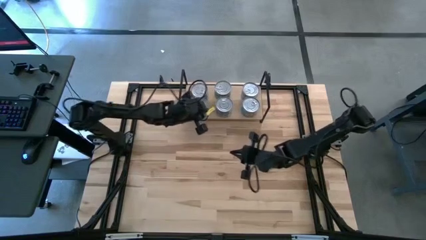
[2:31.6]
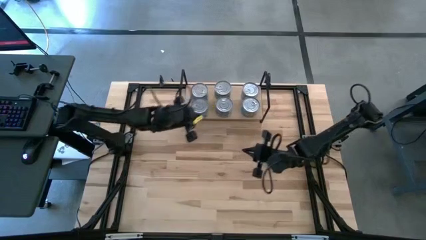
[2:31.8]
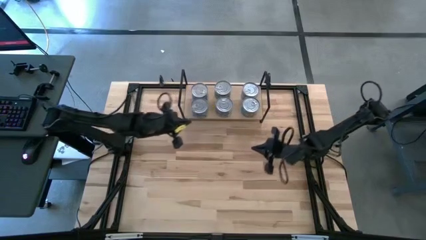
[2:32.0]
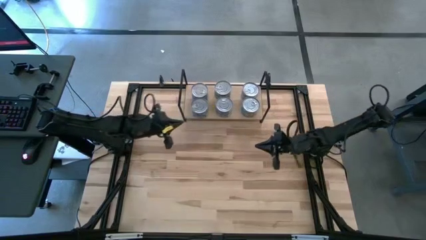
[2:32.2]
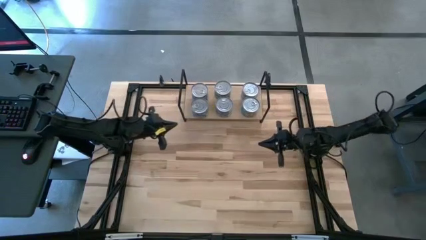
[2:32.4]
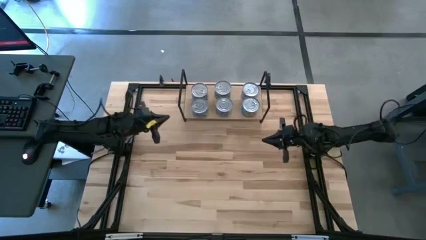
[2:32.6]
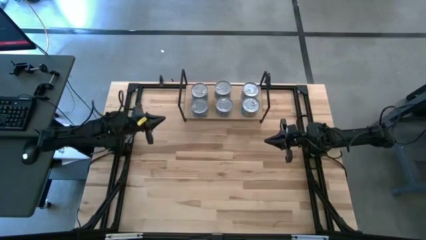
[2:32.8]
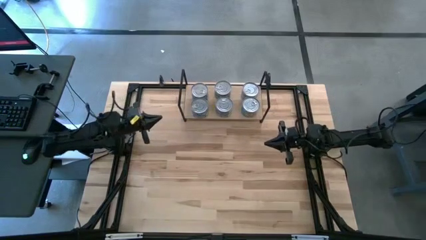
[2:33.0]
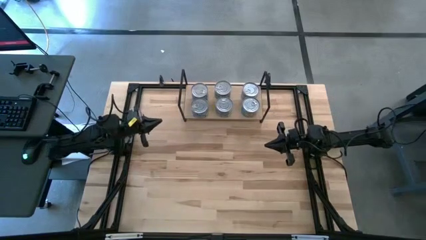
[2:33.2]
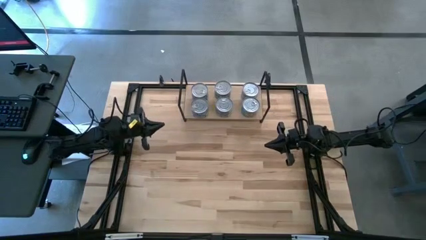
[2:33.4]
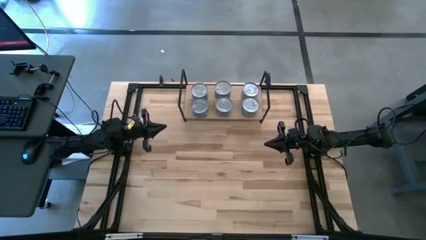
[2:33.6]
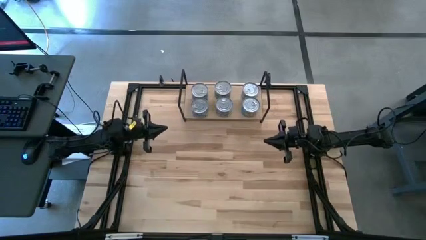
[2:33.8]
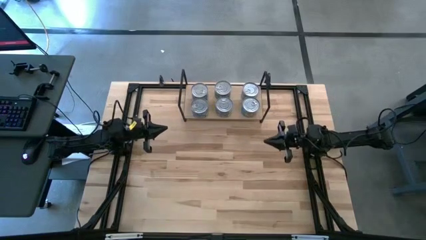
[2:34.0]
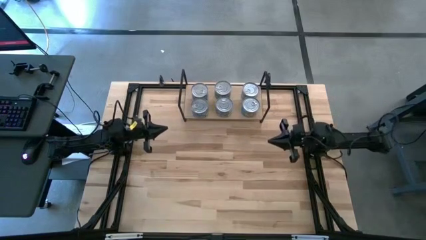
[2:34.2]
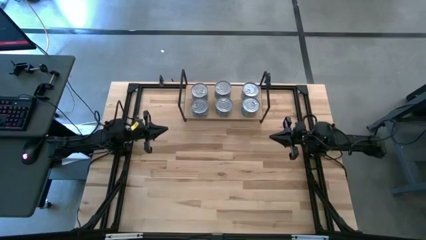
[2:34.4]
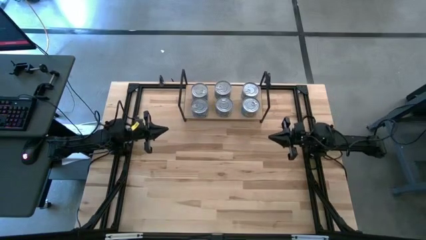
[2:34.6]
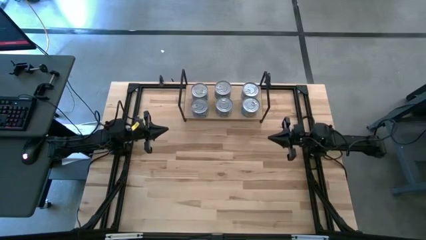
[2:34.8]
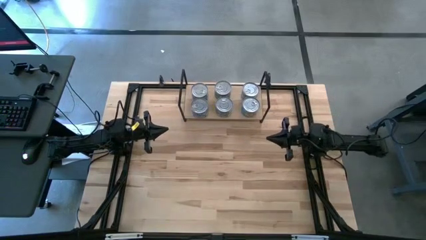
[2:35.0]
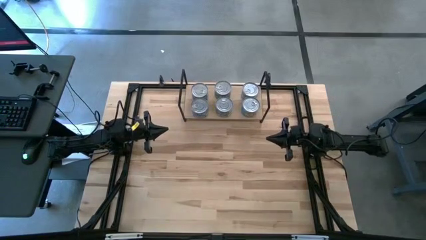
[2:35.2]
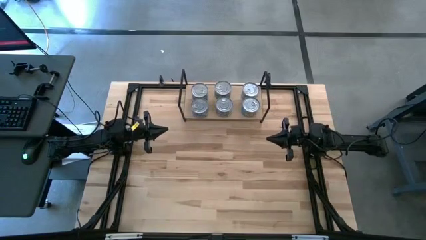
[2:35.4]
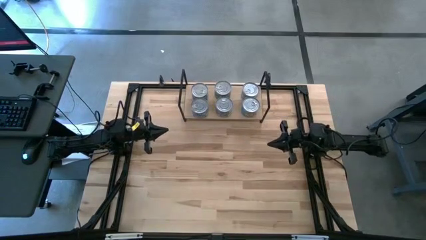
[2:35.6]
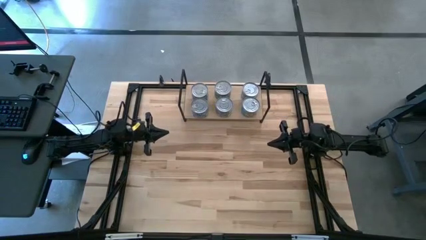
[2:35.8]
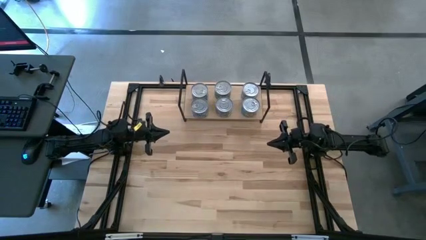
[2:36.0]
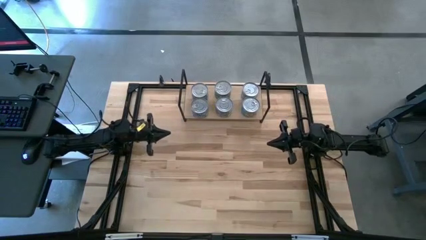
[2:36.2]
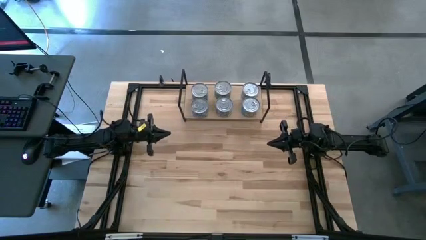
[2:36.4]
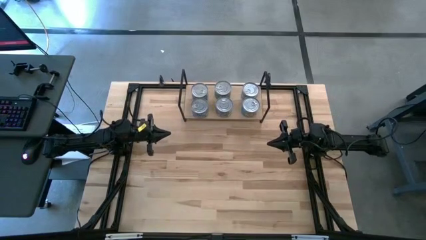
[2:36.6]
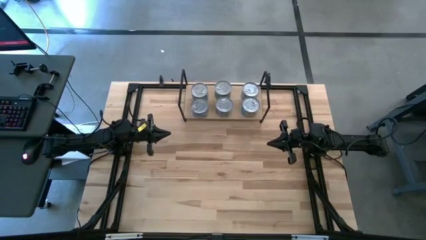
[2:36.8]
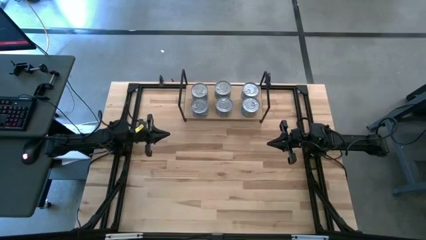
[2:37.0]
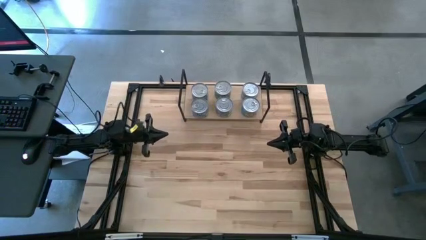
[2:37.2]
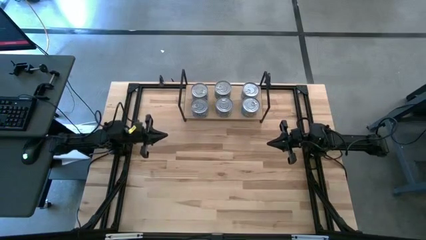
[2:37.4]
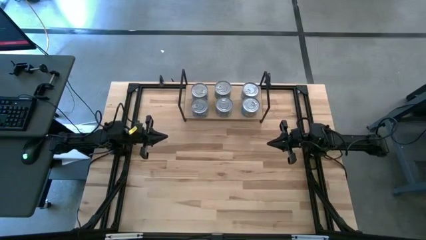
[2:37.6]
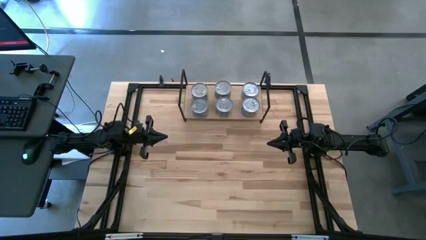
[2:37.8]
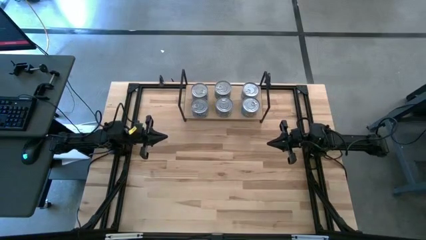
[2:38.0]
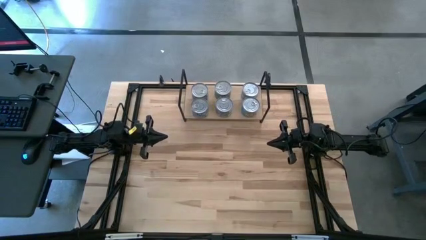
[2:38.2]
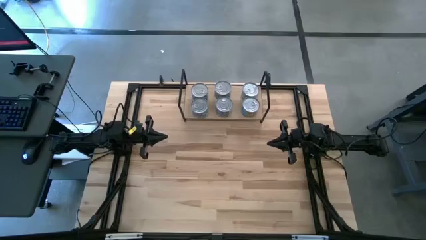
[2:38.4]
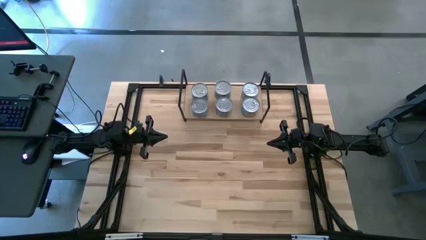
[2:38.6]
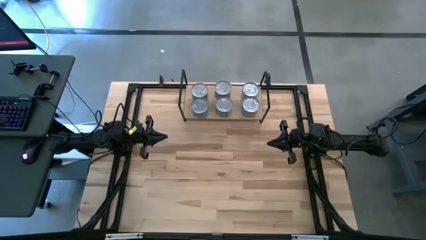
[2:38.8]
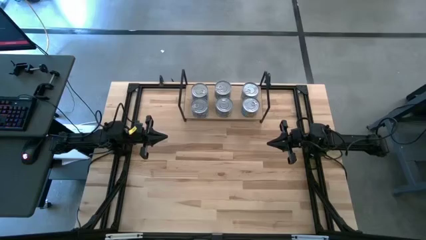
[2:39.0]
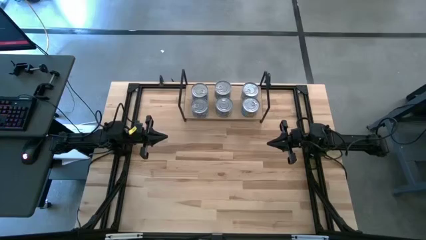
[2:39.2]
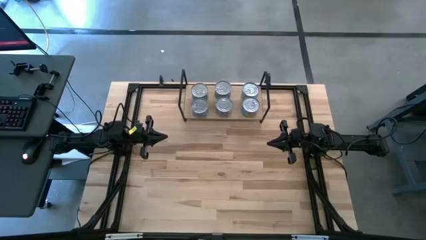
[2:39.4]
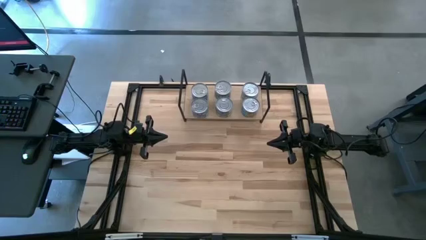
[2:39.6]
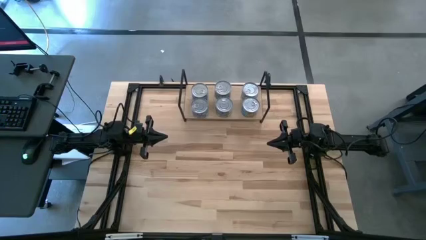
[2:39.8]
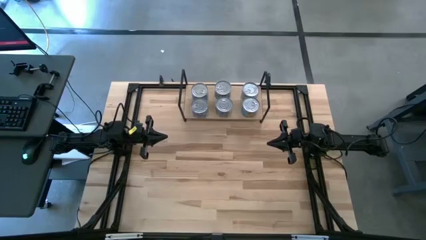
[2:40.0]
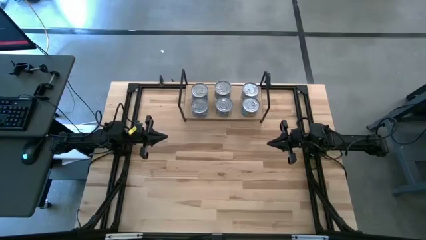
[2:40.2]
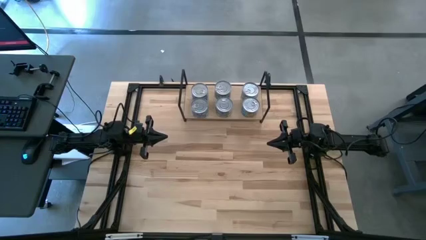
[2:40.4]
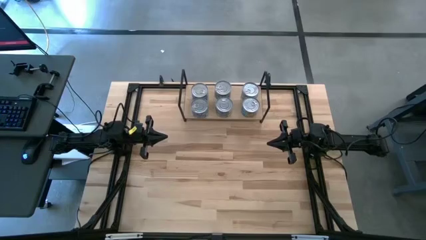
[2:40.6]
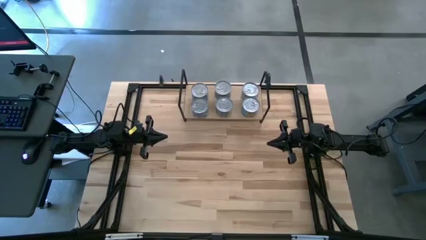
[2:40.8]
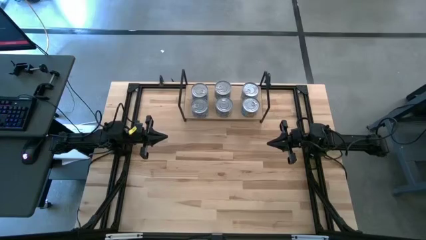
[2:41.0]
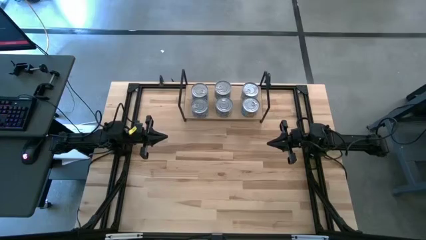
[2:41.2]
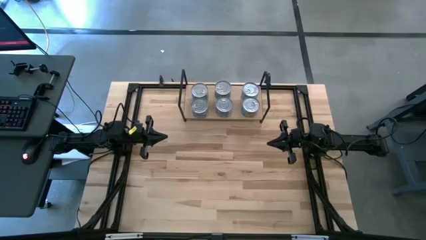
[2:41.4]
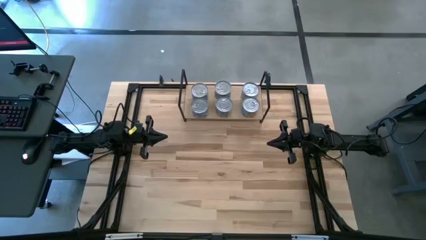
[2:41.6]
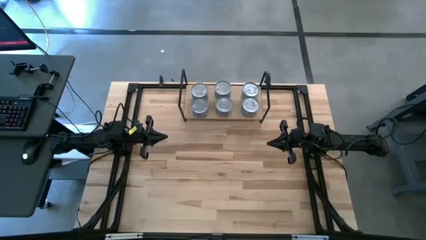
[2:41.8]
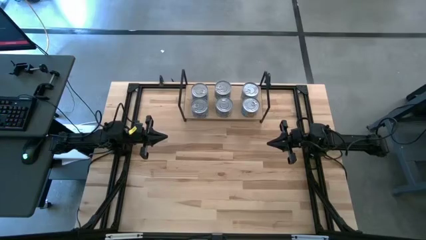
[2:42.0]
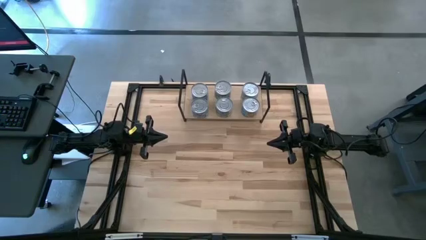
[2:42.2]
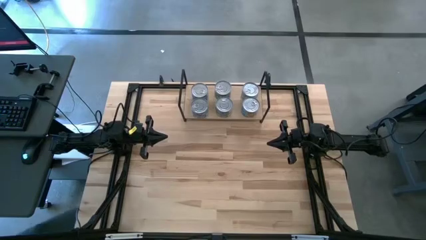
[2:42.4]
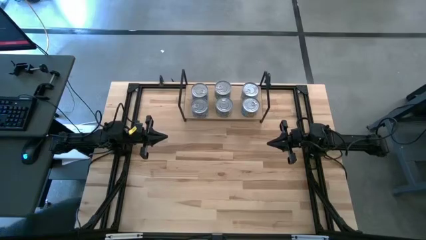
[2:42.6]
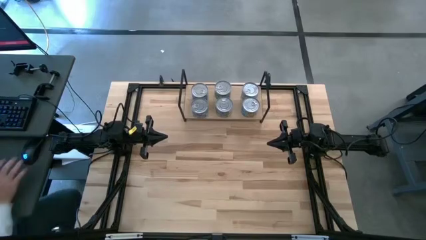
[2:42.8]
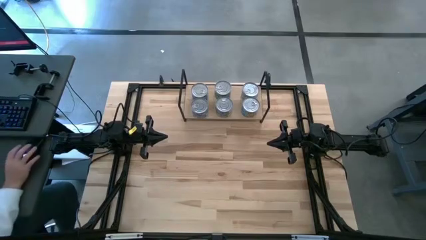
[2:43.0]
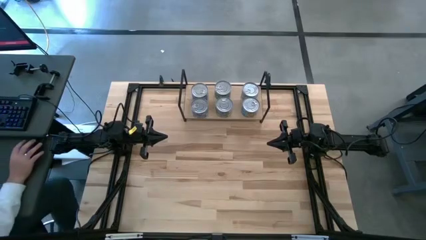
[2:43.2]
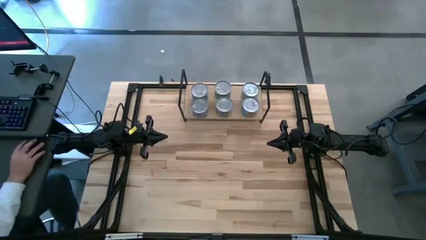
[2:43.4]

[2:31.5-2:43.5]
Task: Stack canned seafood by type on shelf
Return to Home Position

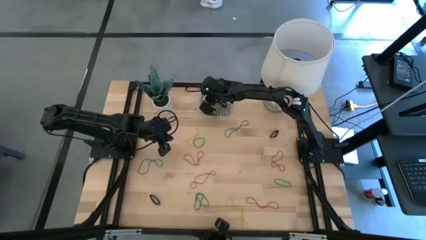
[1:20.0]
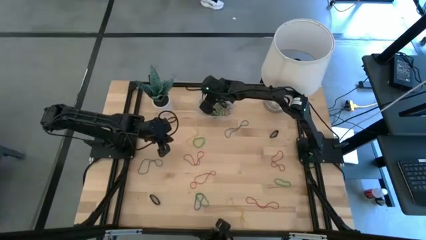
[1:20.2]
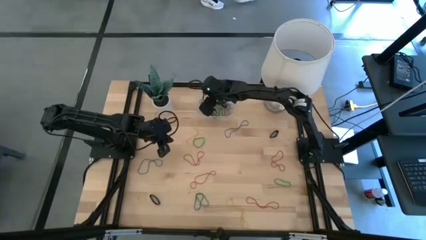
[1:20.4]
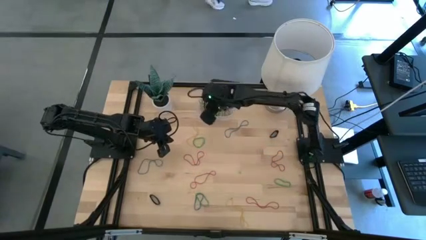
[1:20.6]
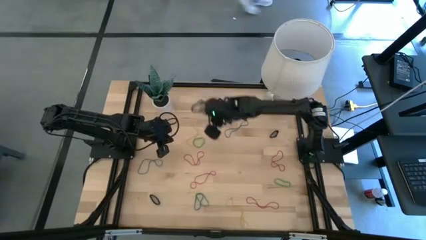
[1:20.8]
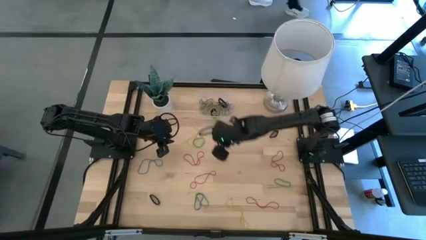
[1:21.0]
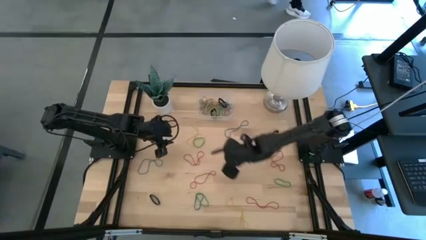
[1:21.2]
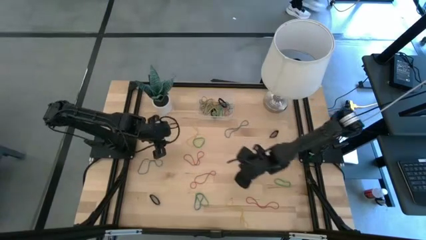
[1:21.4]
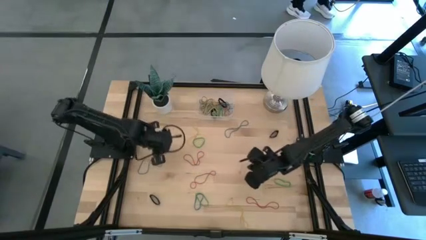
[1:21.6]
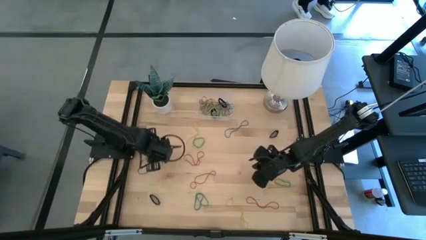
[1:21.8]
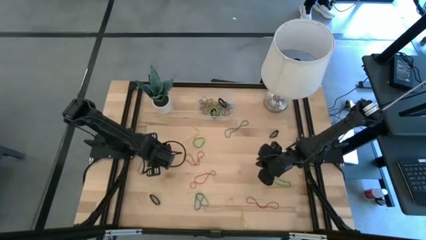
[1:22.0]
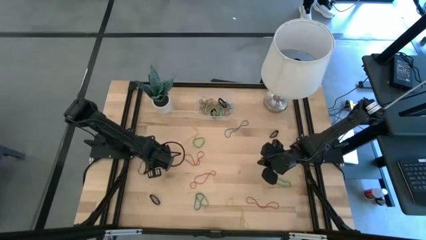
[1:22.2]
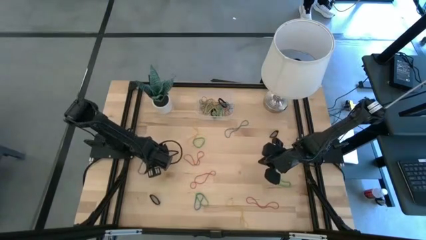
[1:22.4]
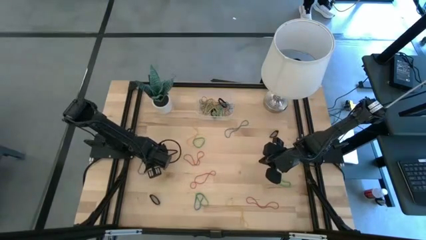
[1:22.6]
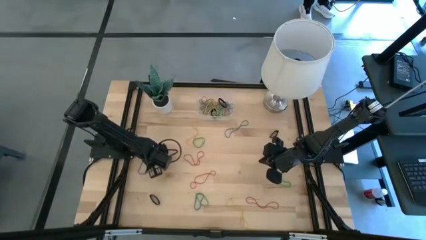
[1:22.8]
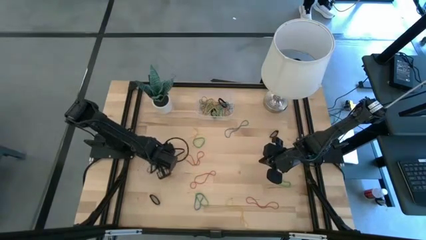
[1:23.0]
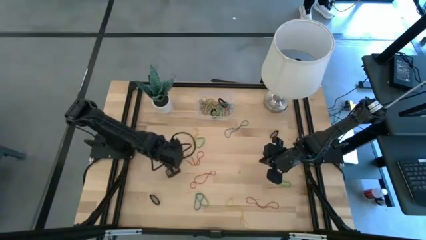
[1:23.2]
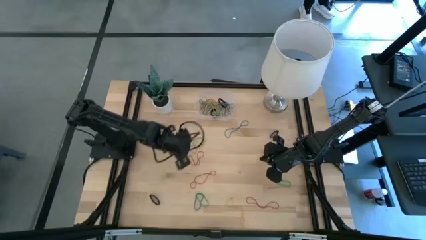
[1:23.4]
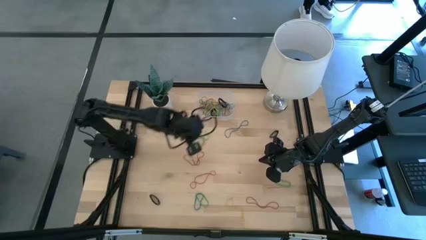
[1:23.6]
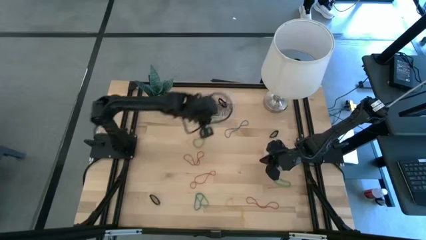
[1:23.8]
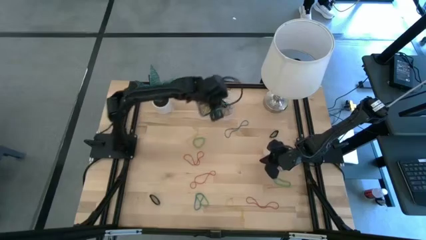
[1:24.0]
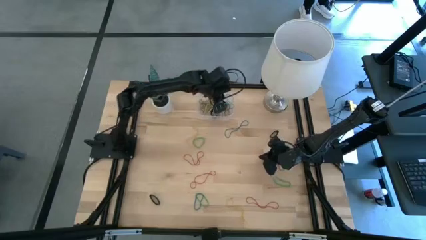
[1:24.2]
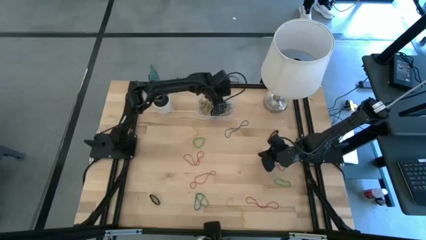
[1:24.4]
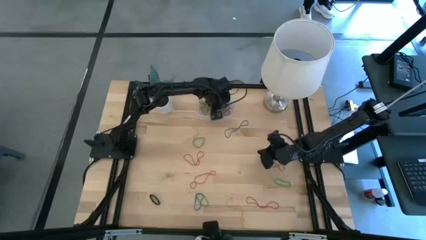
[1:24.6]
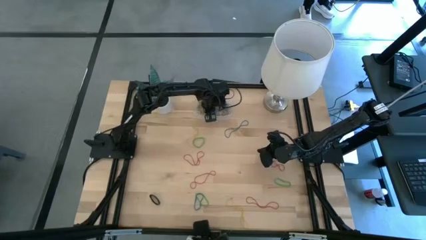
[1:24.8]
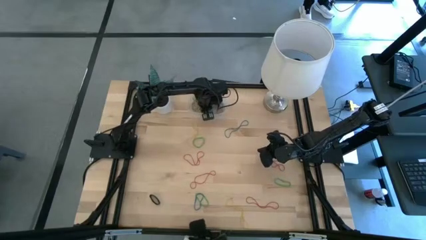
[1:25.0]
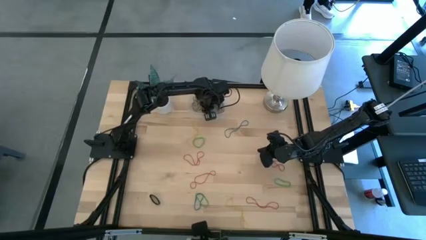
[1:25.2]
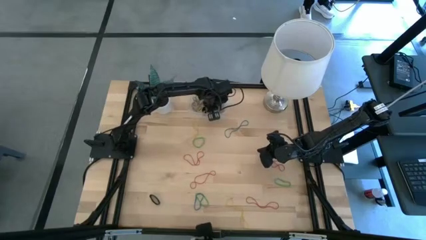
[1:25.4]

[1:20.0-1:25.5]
Task: Pick and place rubber bands into bin
Put the blue rubber band into the transparent bin
